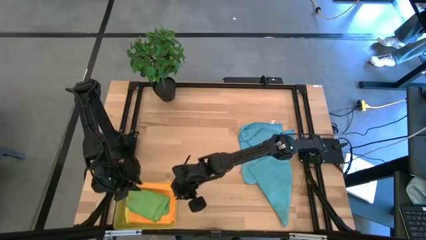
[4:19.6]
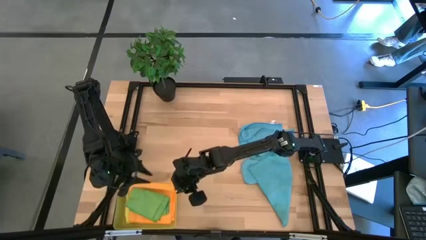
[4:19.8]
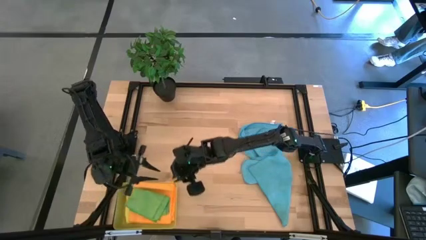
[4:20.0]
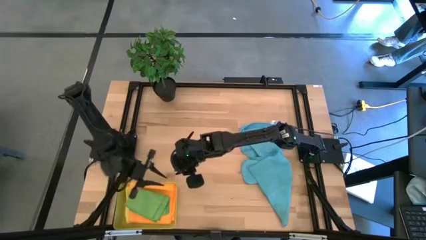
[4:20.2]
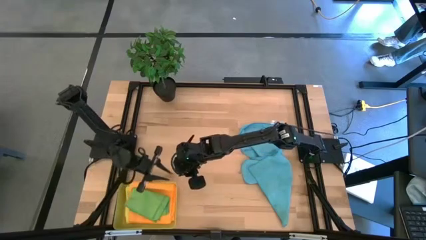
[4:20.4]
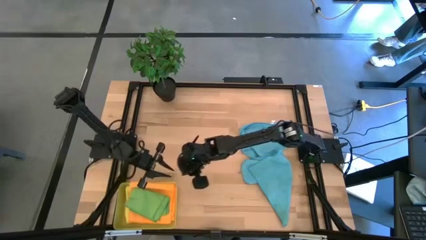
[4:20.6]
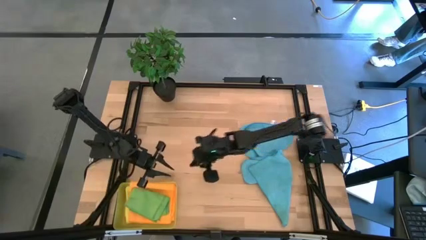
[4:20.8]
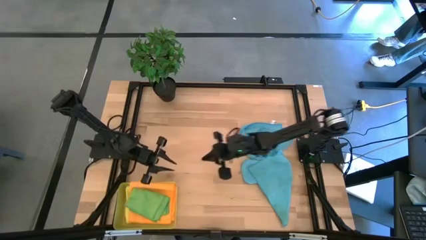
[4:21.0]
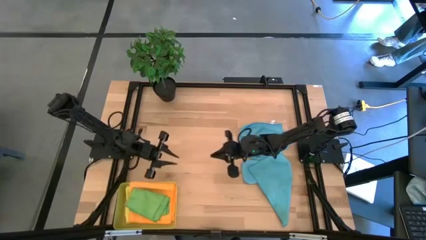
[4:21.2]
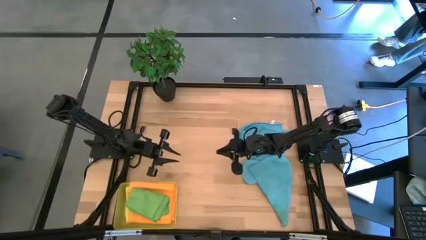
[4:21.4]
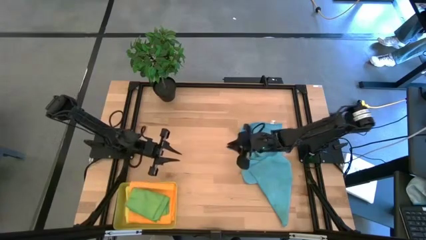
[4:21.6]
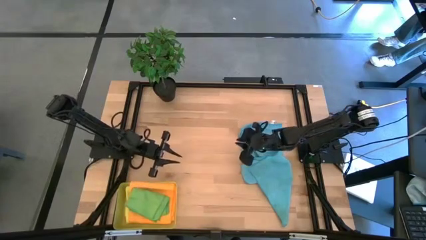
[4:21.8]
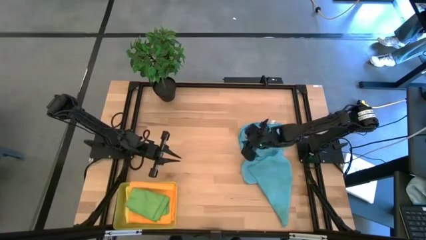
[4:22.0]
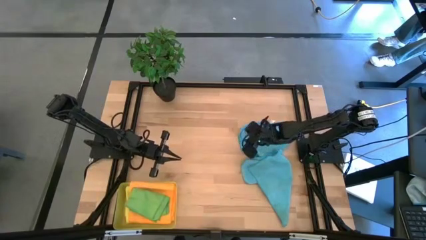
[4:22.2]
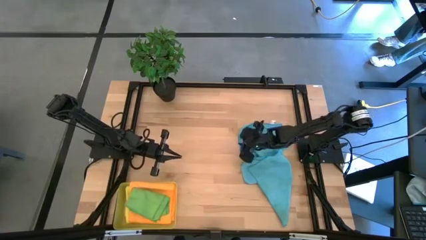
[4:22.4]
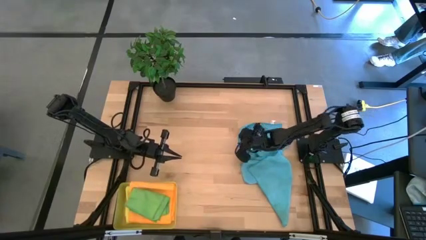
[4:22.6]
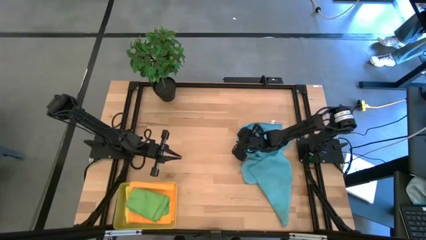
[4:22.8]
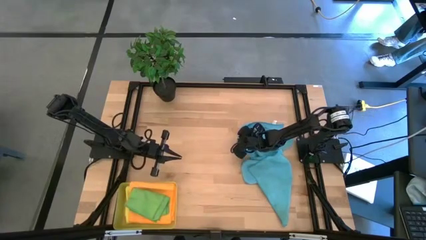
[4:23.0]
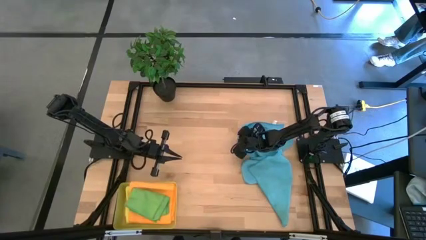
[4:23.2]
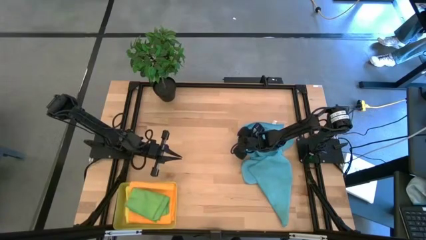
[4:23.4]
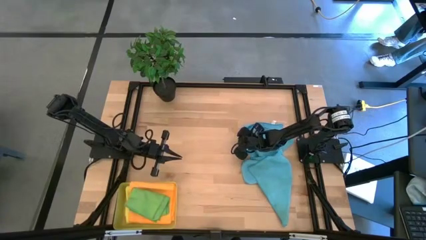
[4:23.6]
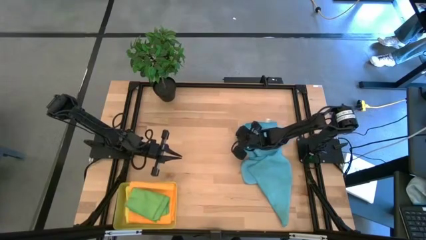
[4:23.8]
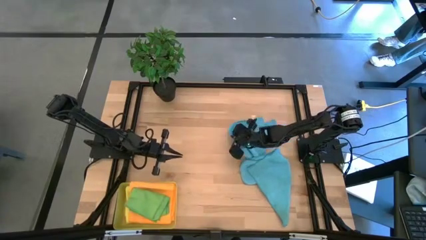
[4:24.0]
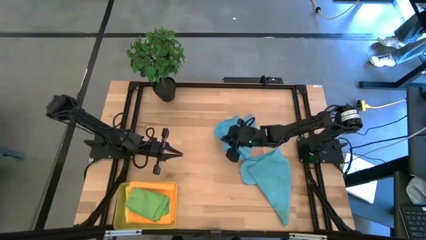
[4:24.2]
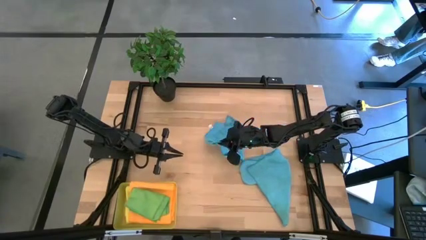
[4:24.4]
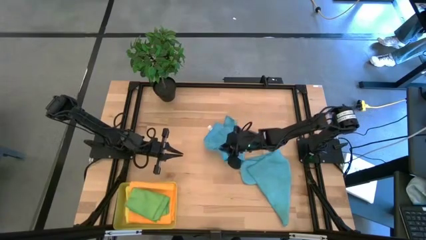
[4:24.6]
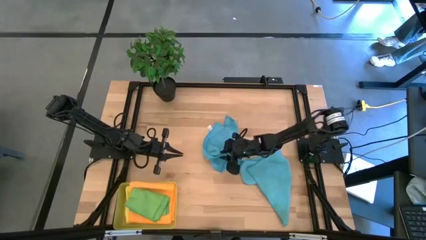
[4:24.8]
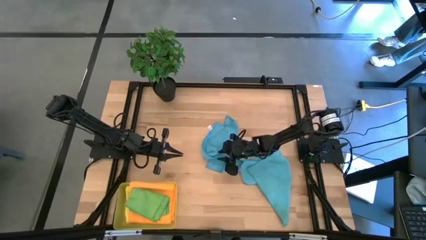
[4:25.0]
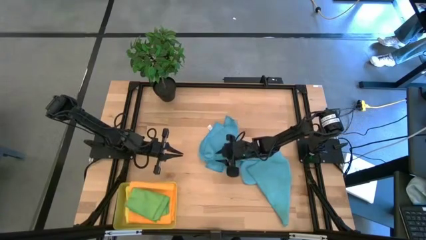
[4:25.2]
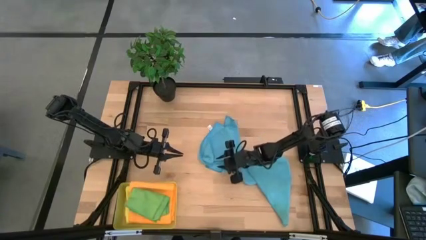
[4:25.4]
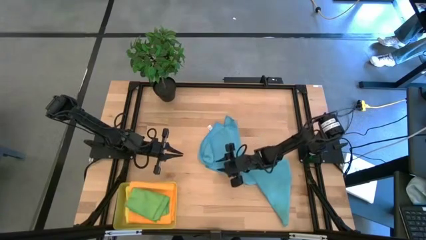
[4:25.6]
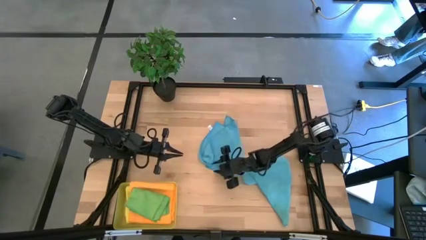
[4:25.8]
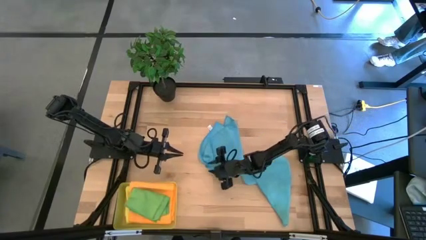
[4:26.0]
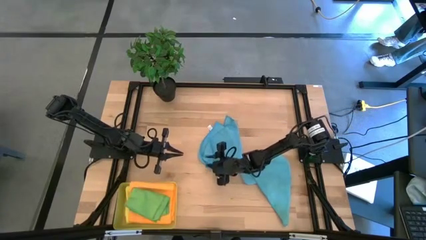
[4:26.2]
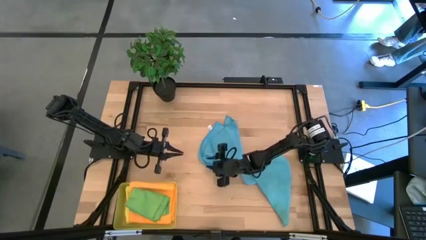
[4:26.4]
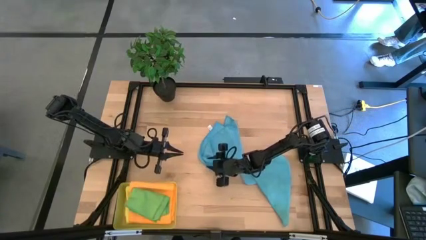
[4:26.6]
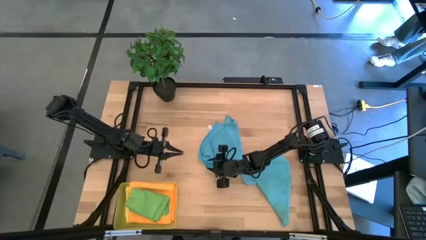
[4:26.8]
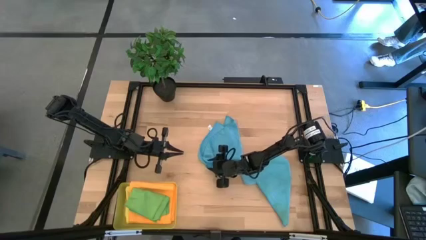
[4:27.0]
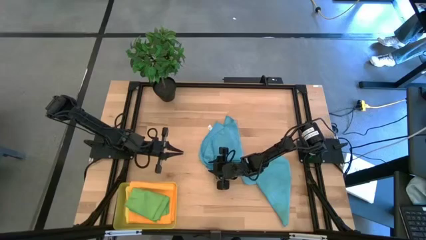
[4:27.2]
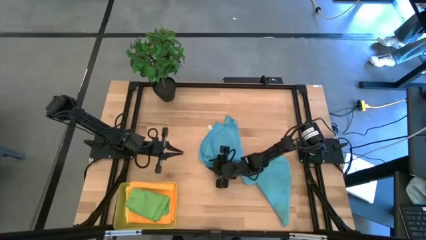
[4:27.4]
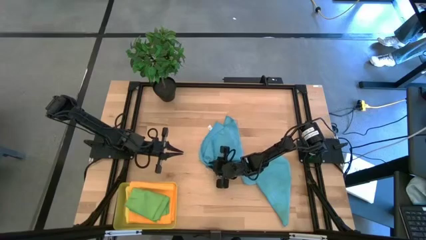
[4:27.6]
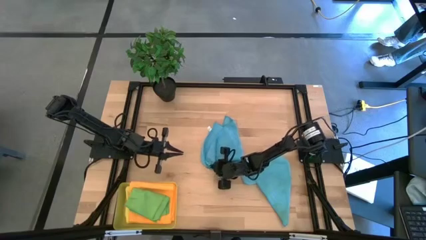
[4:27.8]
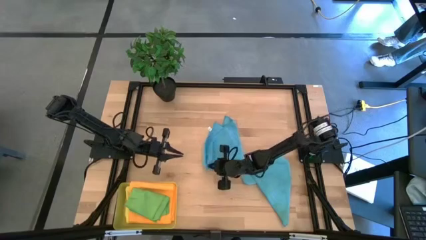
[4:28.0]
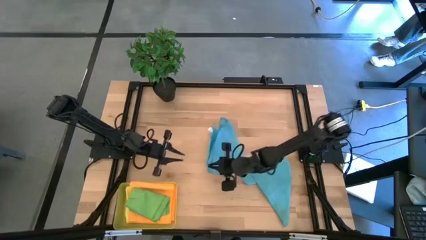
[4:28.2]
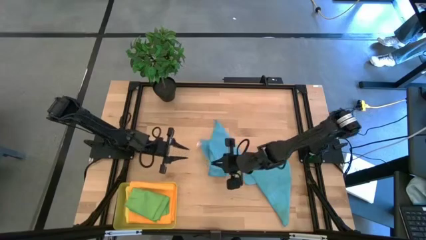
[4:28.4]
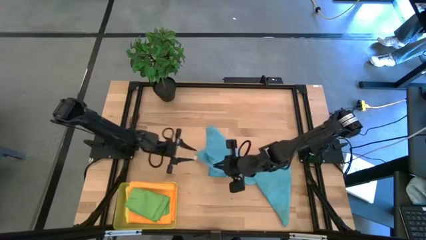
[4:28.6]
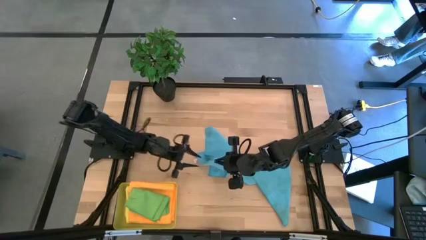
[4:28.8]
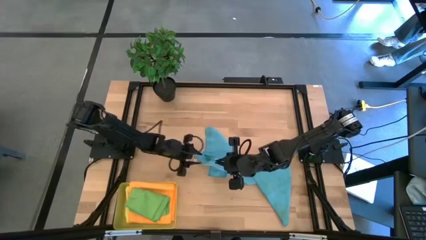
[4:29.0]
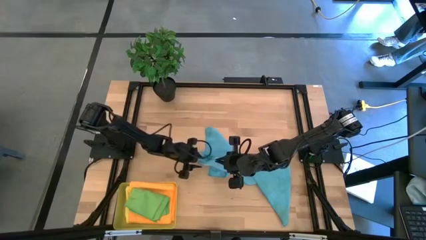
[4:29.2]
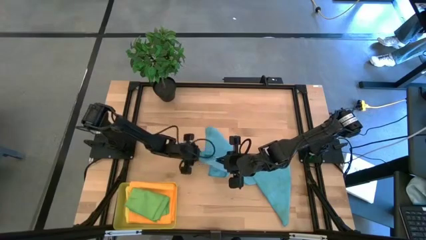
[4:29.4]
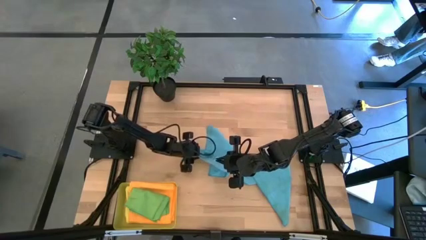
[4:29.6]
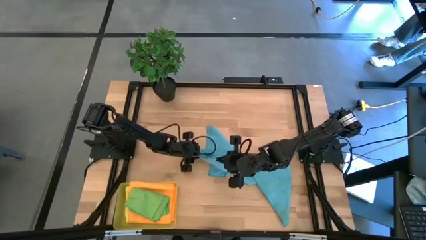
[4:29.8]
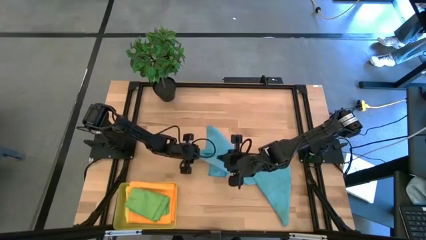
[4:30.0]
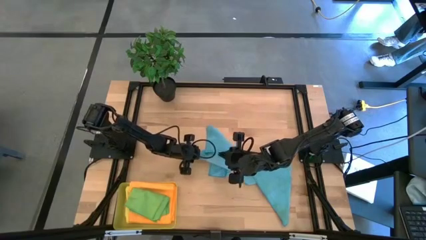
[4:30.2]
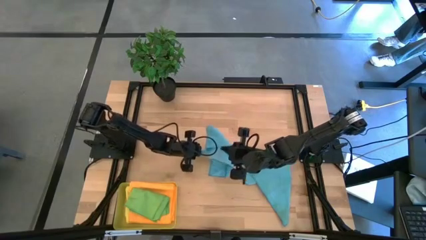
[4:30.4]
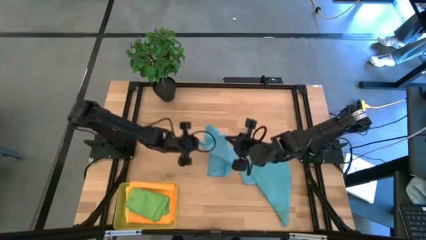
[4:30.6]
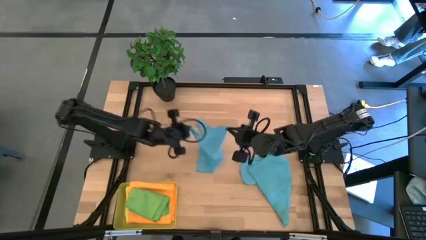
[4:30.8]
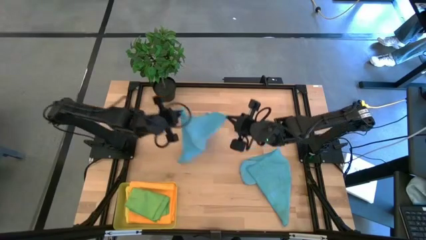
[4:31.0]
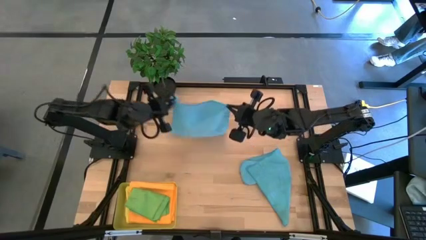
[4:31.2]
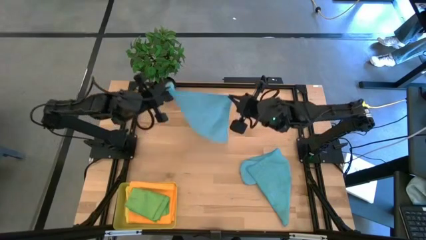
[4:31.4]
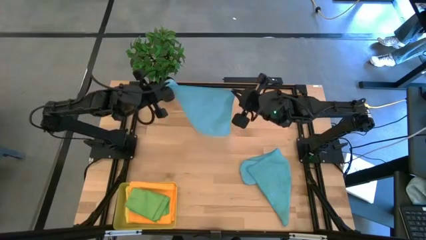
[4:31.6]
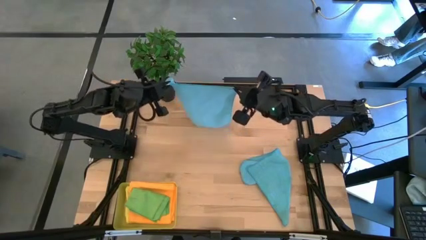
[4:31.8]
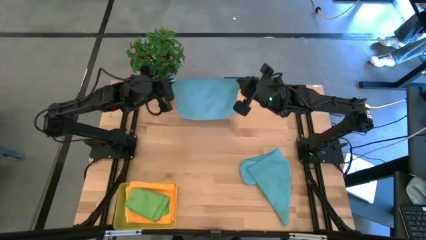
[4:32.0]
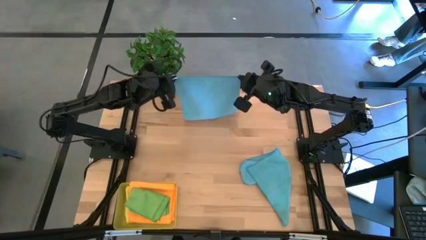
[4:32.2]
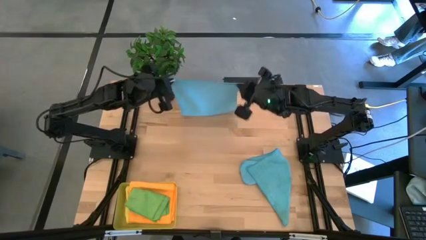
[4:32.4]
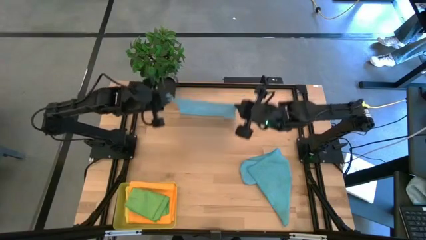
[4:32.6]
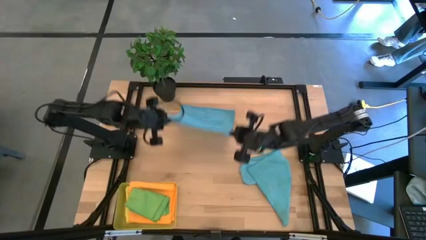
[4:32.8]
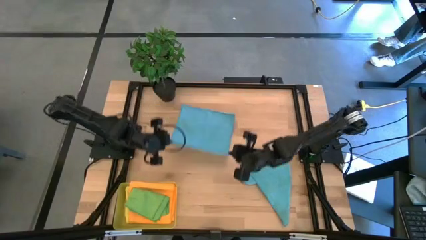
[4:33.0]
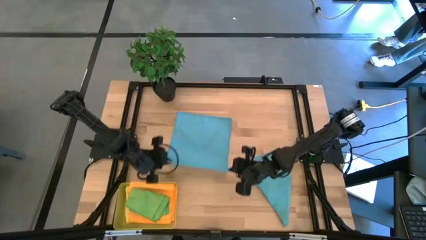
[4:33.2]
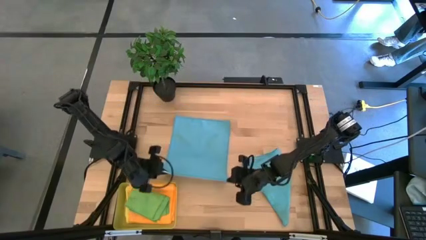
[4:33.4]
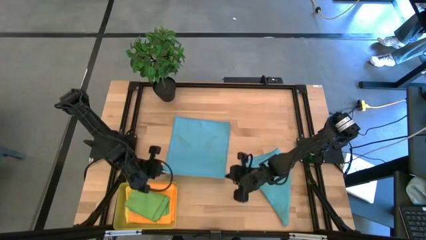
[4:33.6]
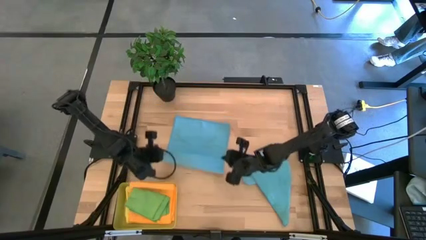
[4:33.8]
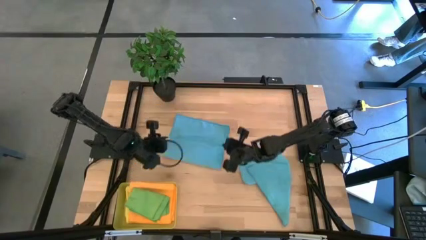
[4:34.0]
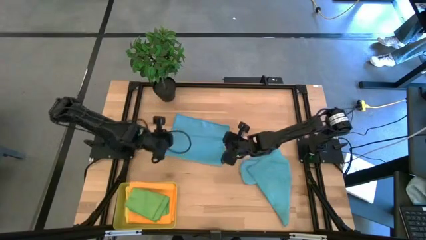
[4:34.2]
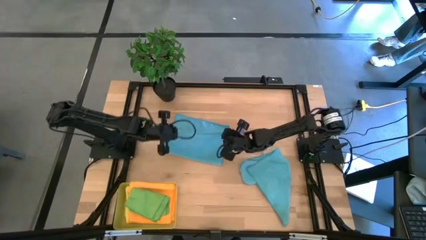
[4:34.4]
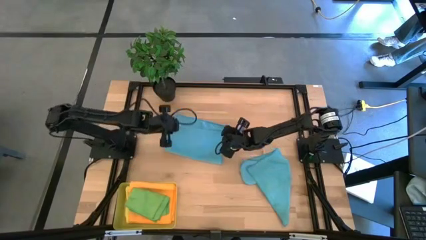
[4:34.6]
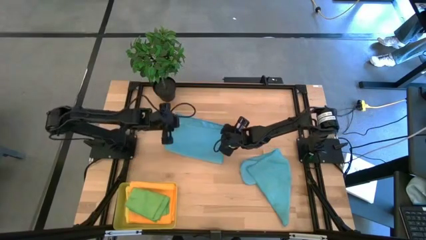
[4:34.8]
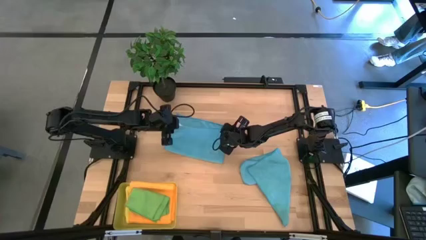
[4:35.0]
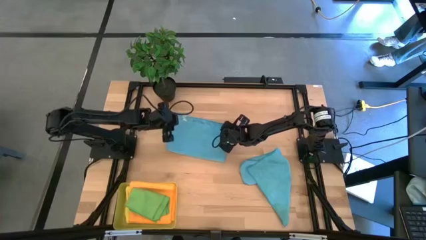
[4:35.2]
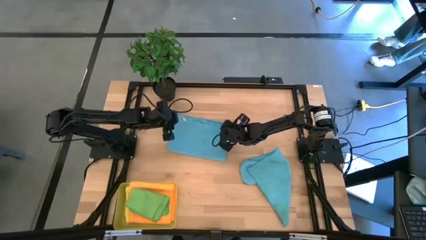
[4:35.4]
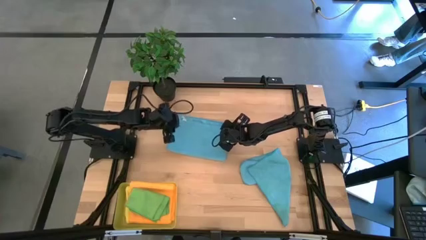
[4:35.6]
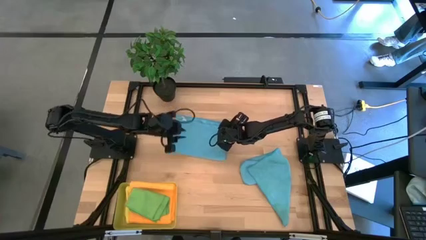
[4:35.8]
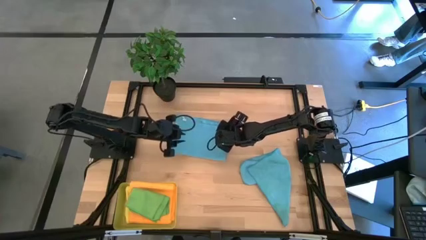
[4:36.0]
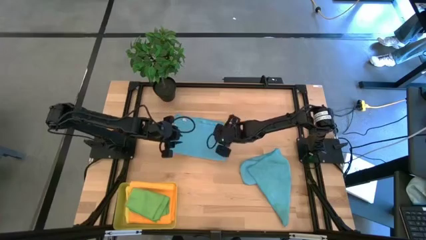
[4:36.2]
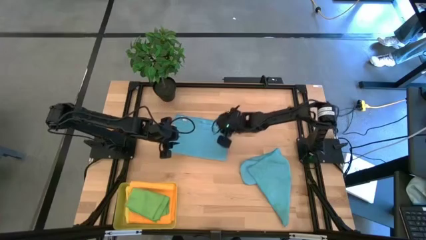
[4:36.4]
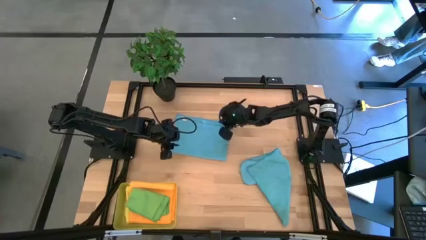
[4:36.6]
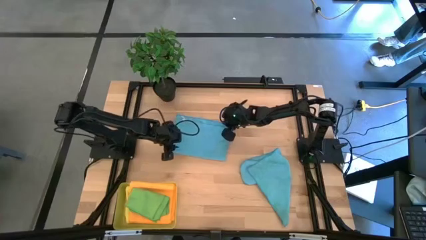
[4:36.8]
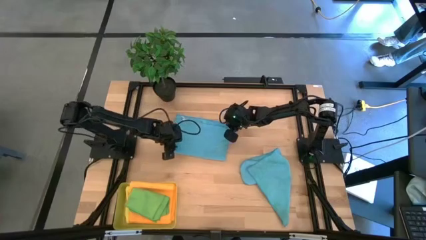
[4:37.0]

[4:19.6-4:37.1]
Task: Fold microfiber towels
Fold the top blue microfiber cloth
